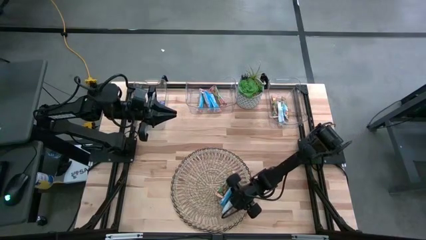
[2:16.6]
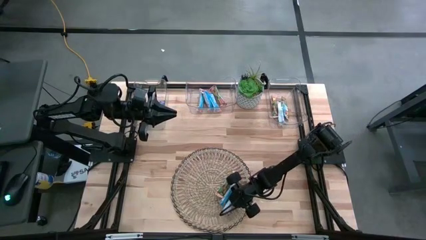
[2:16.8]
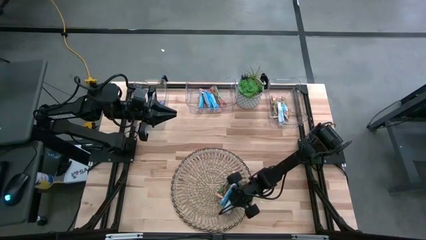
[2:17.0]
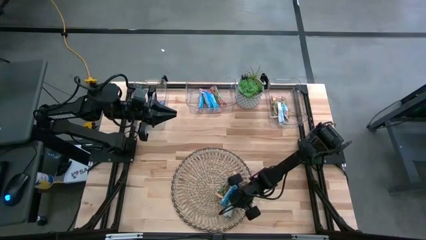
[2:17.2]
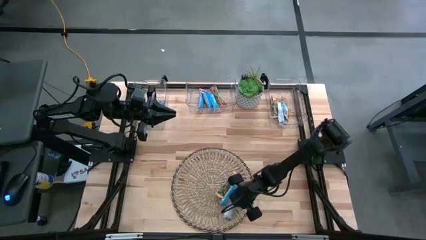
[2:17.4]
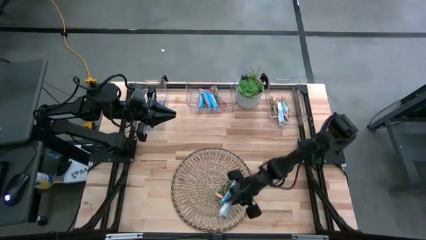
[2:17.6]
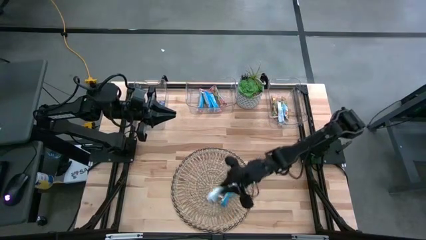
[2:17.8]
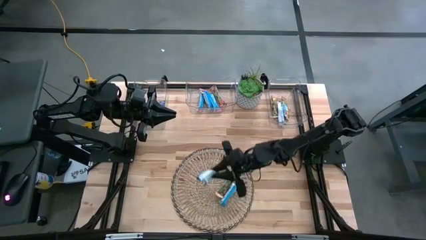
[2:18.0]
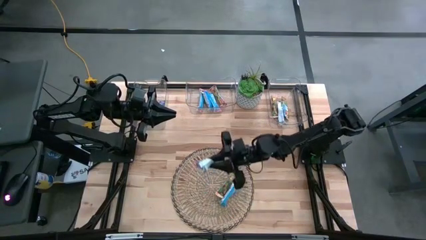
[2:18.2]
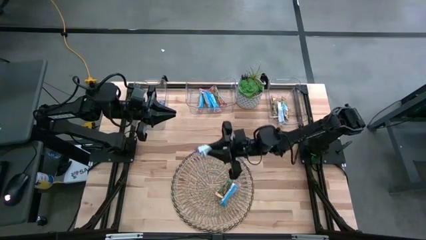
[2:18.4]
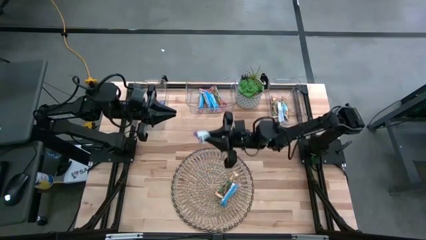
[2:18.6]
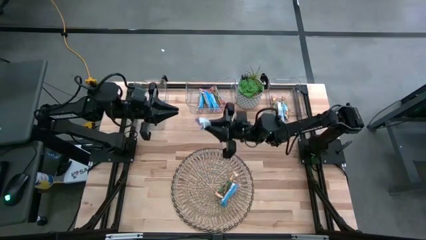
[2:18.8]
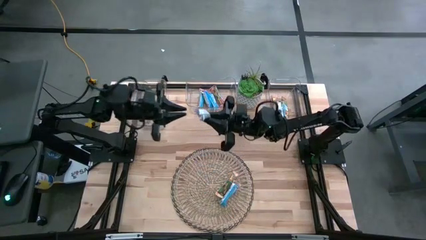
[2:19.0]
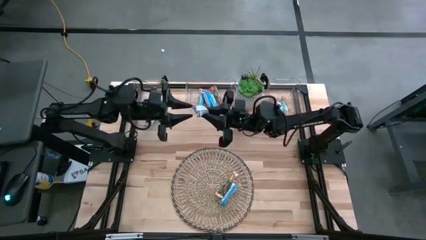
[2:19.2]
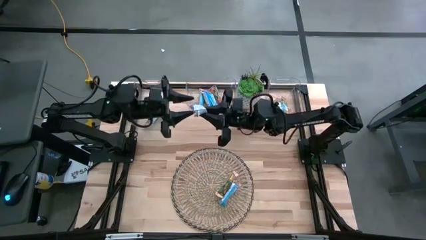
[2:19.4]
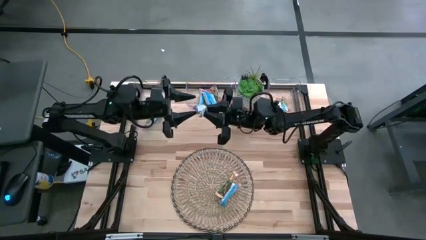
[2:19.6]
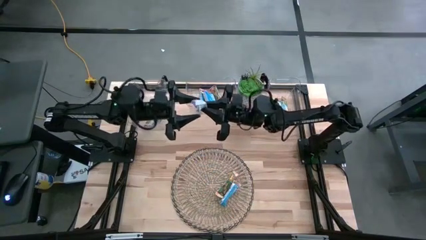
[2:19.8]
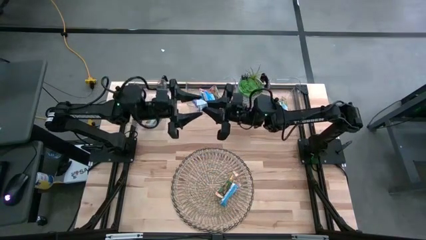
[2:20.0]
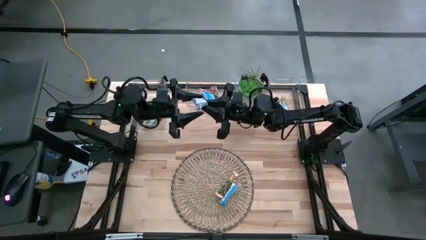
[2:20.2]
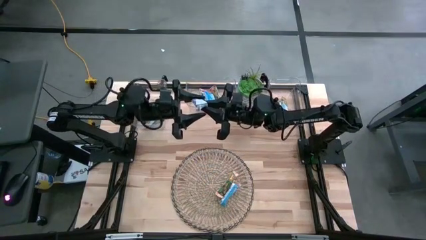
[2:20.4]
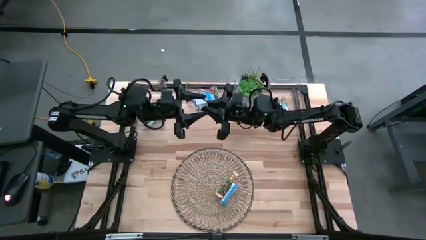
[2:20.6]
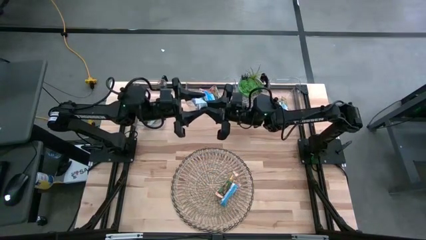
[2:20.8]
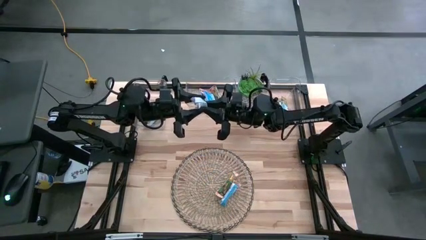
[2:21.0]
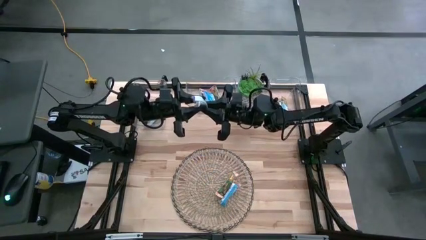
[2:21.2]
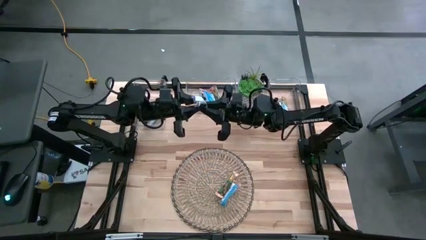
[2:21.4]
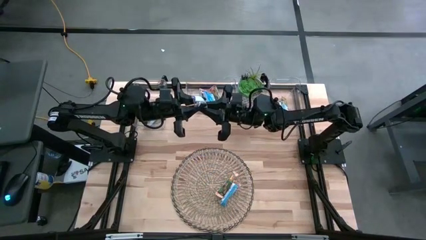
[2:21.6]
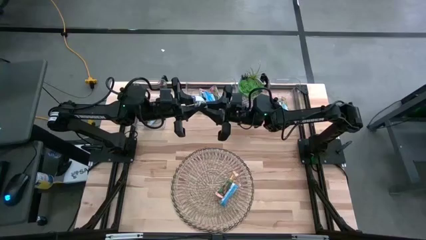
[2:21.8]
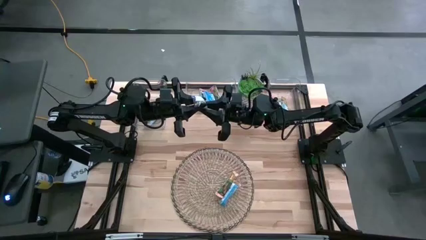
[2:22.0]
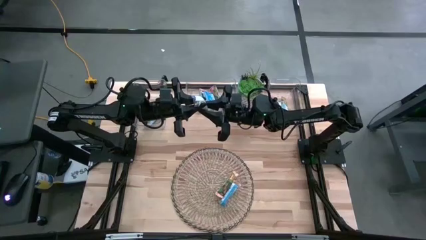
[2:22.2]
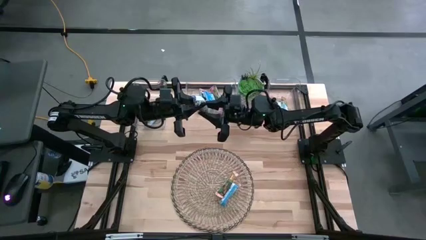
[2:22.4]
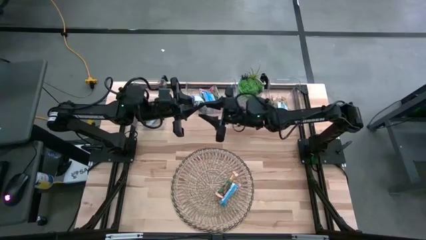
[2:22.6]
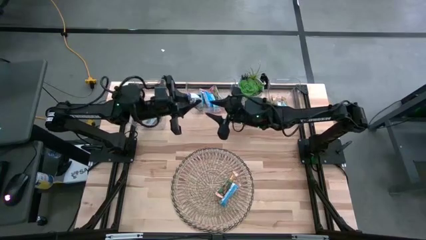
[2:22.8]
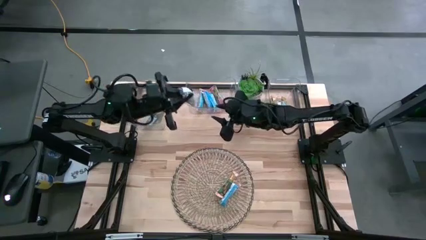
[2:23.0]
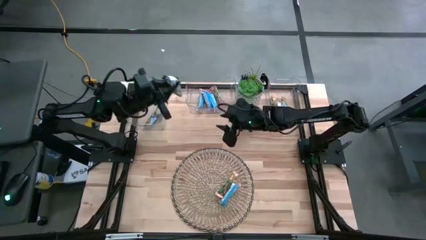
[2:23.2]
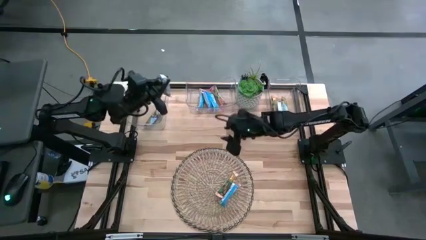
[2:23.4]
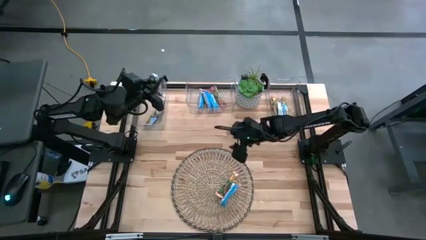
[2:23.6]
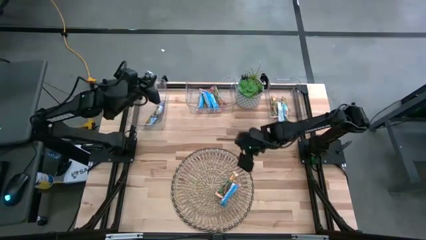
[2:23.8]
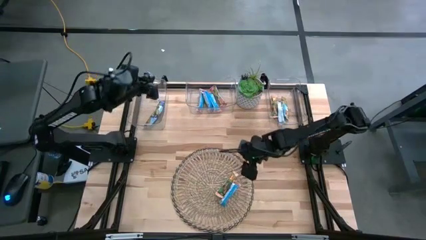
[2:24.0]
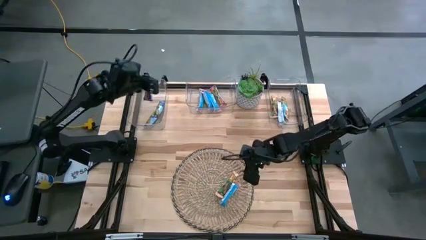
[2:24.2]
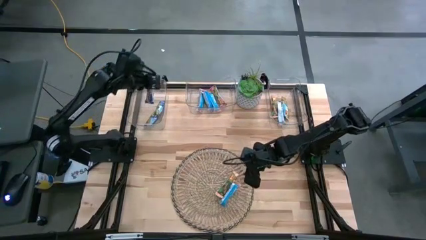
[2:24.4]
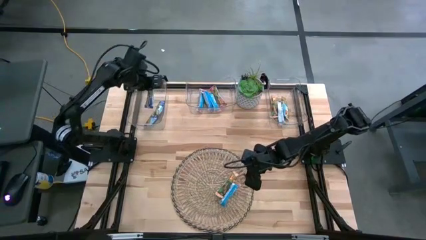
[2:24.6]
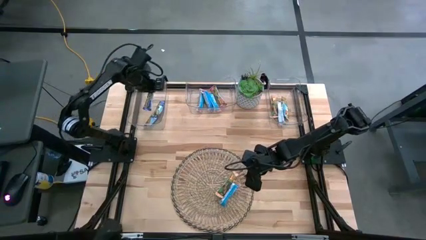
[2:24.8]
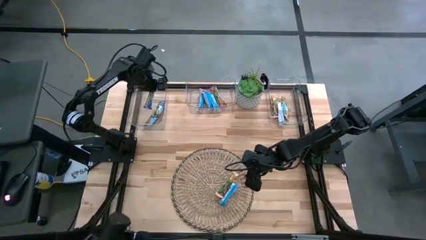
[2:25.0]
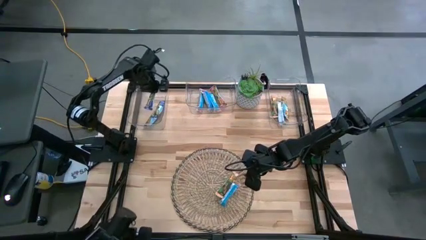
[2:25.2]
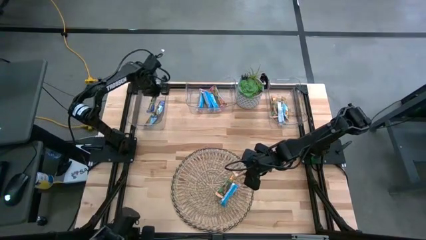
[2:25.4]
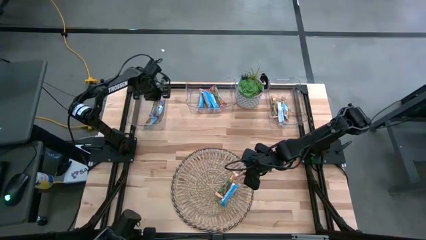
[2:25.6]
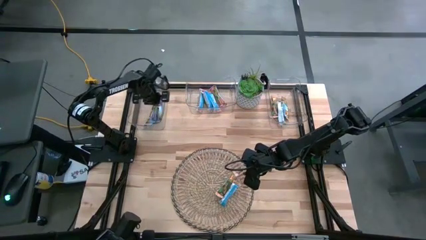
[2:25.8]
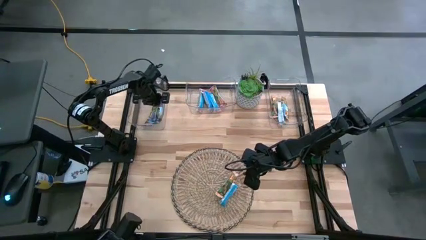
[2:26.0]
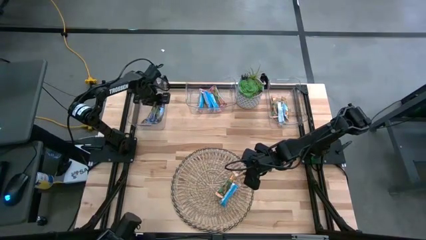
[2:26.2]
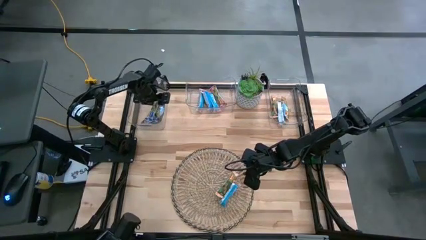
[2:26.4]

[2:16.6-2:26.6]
Task: Pick and place Granola Bars by type
Put the blue granola bar into the left transparent bin
